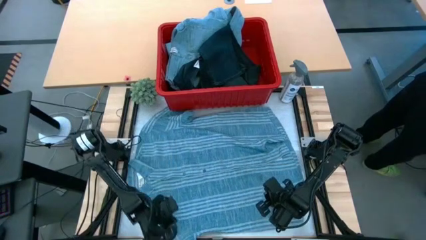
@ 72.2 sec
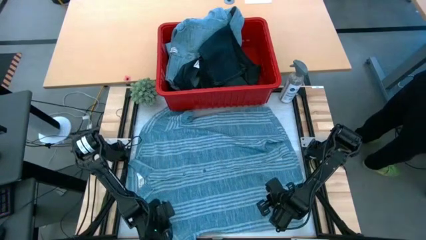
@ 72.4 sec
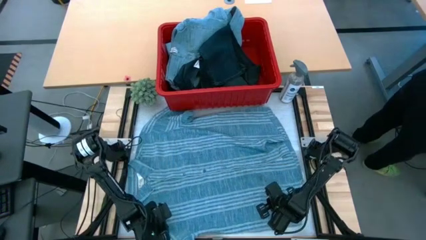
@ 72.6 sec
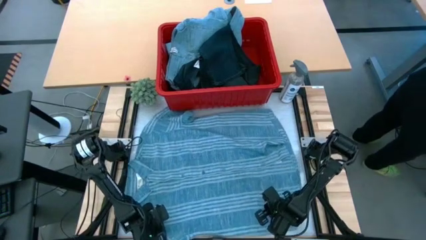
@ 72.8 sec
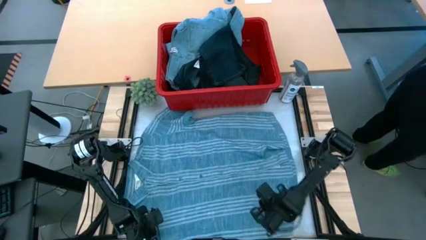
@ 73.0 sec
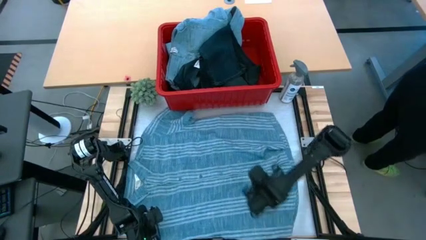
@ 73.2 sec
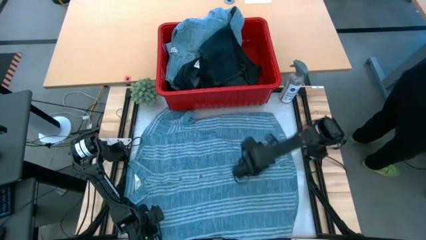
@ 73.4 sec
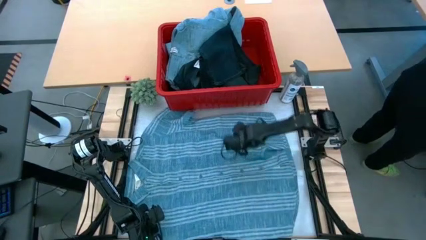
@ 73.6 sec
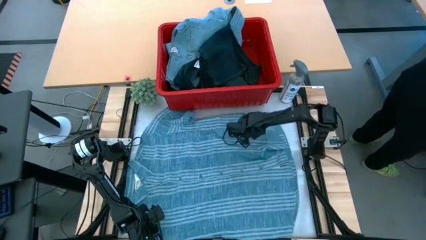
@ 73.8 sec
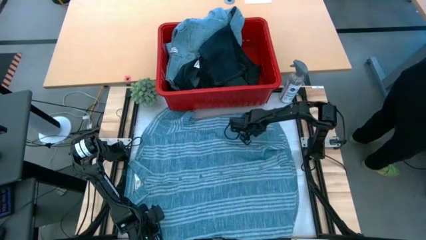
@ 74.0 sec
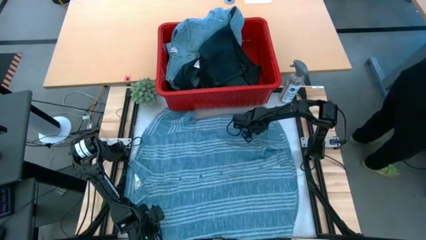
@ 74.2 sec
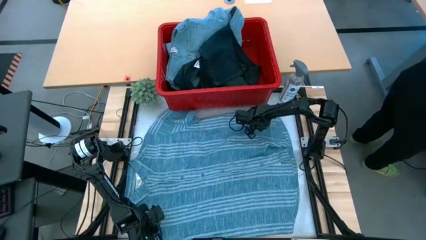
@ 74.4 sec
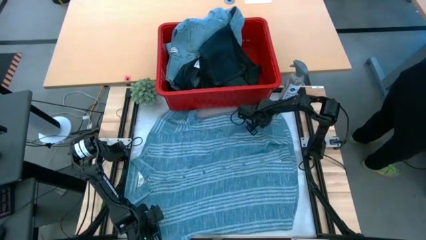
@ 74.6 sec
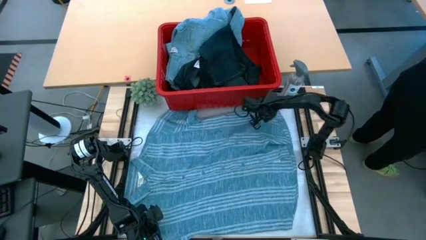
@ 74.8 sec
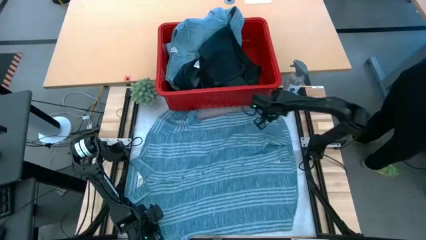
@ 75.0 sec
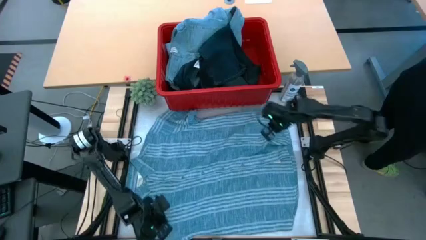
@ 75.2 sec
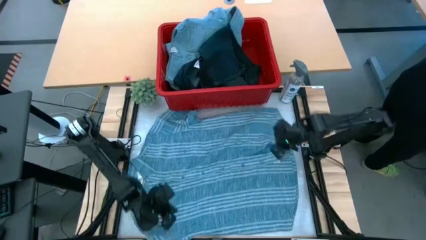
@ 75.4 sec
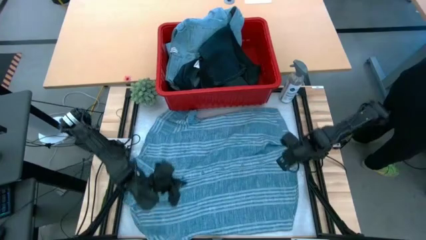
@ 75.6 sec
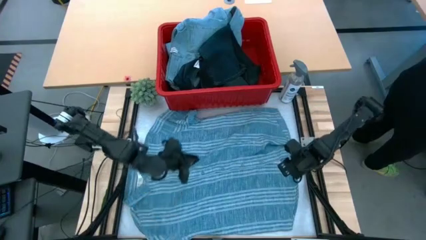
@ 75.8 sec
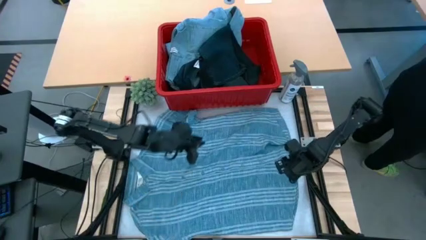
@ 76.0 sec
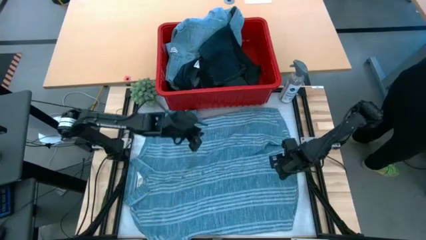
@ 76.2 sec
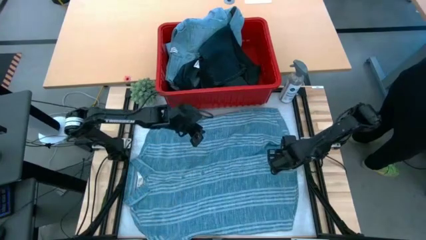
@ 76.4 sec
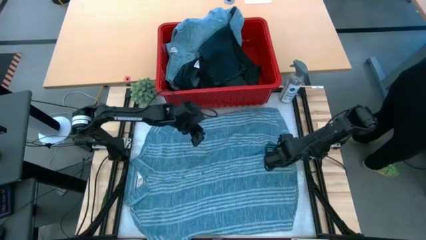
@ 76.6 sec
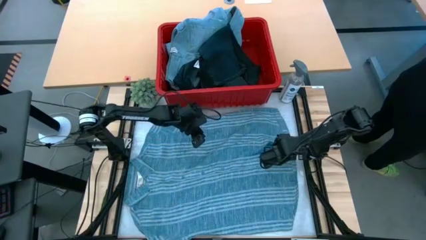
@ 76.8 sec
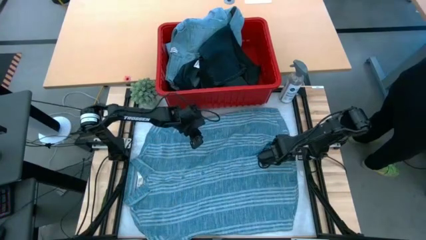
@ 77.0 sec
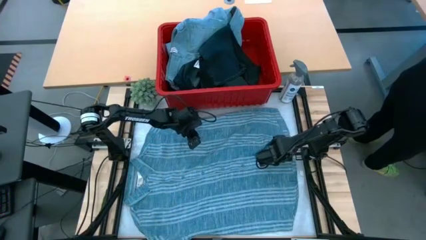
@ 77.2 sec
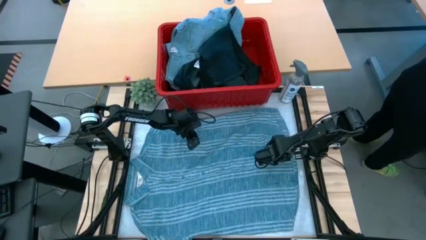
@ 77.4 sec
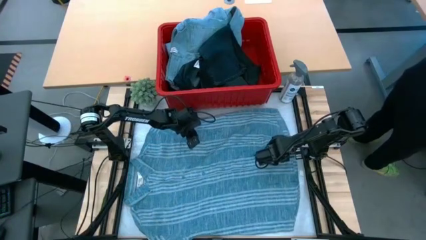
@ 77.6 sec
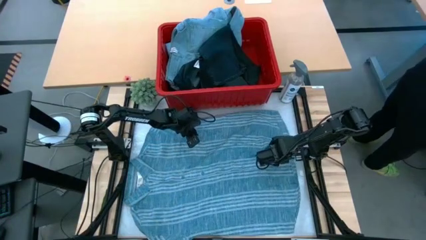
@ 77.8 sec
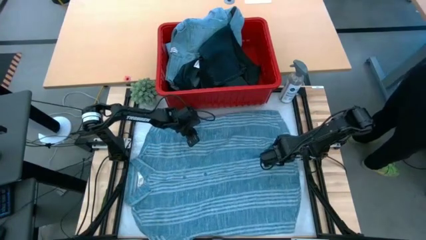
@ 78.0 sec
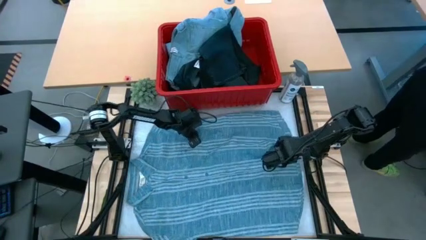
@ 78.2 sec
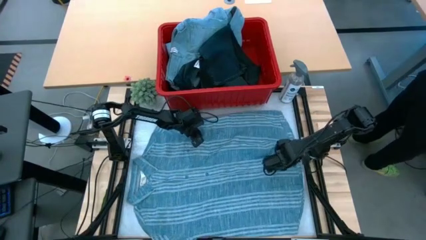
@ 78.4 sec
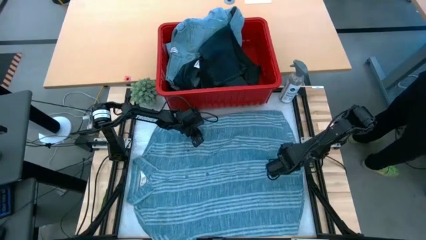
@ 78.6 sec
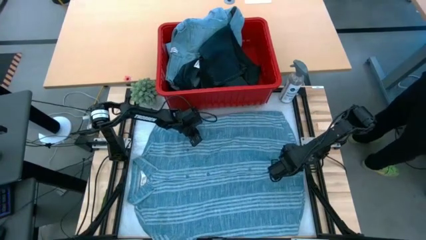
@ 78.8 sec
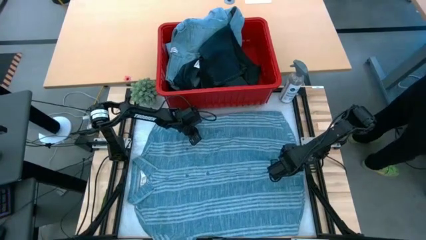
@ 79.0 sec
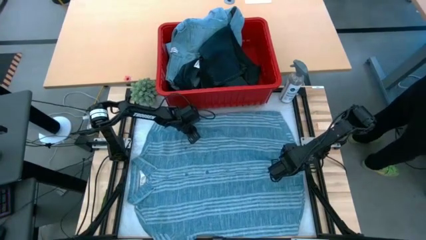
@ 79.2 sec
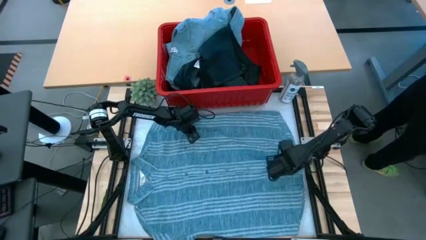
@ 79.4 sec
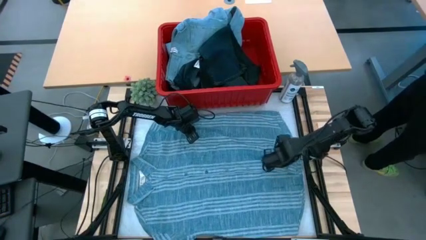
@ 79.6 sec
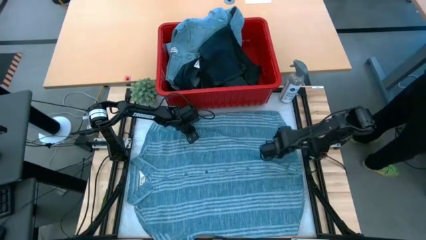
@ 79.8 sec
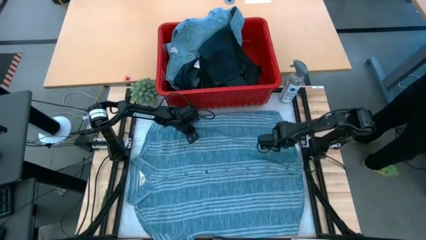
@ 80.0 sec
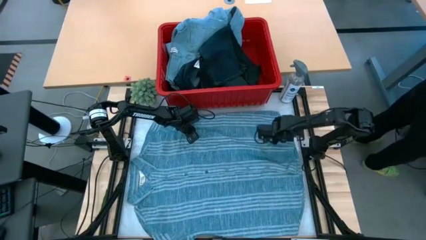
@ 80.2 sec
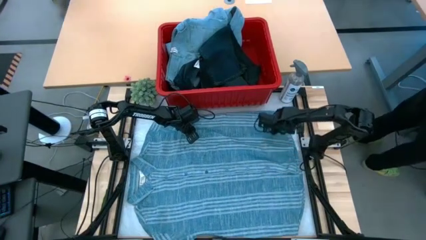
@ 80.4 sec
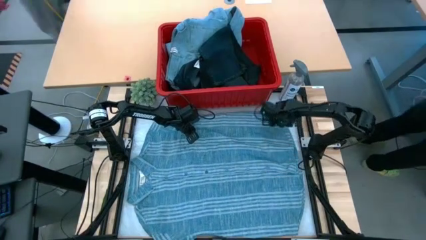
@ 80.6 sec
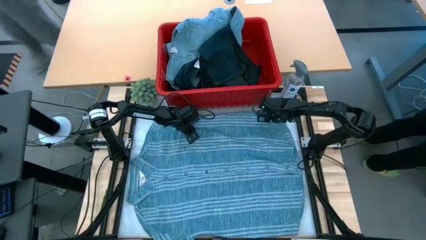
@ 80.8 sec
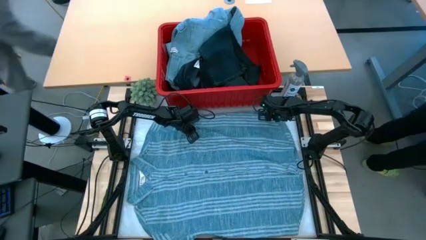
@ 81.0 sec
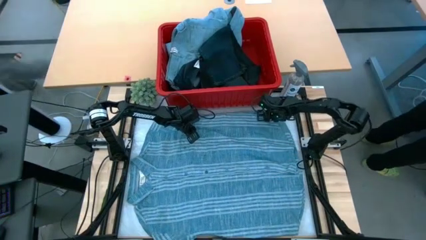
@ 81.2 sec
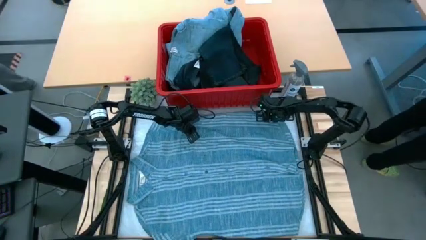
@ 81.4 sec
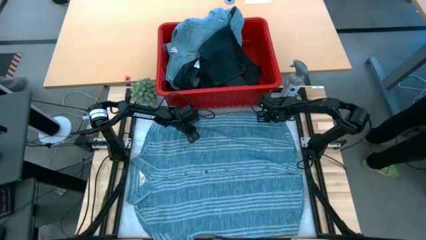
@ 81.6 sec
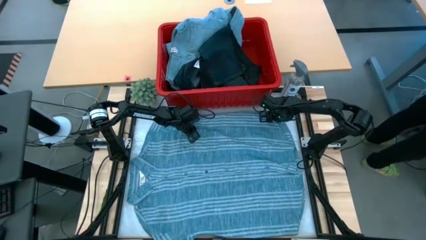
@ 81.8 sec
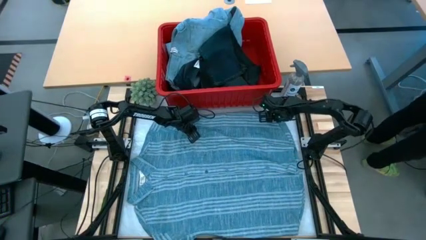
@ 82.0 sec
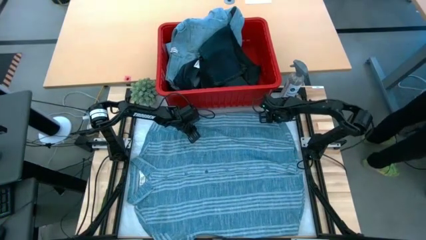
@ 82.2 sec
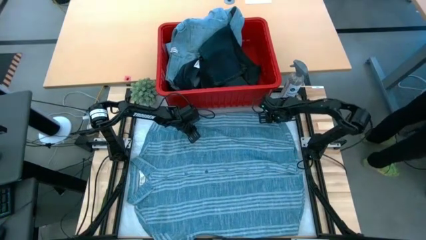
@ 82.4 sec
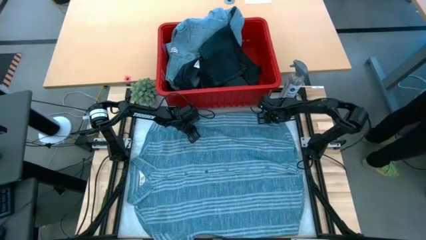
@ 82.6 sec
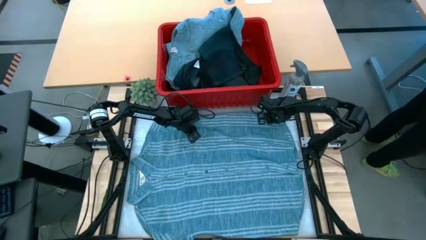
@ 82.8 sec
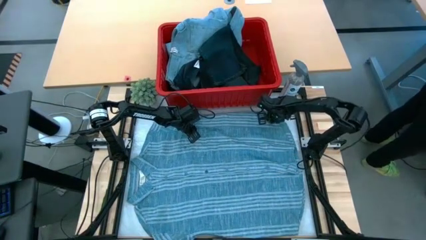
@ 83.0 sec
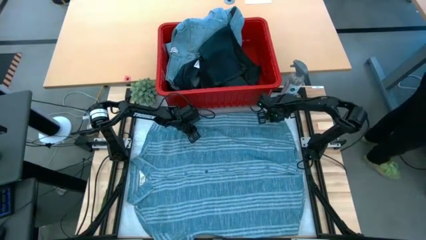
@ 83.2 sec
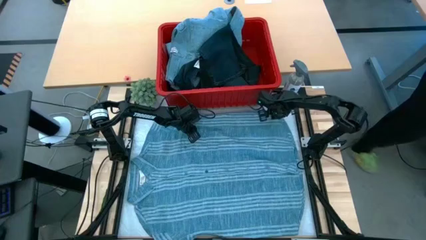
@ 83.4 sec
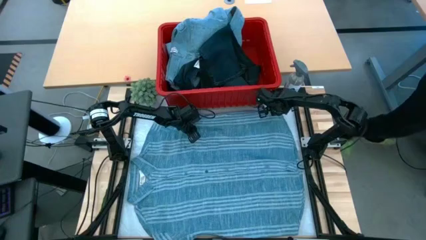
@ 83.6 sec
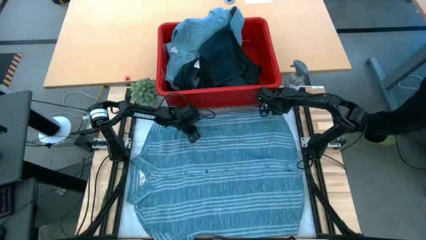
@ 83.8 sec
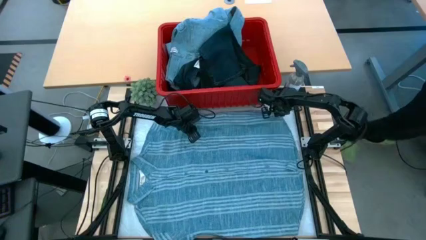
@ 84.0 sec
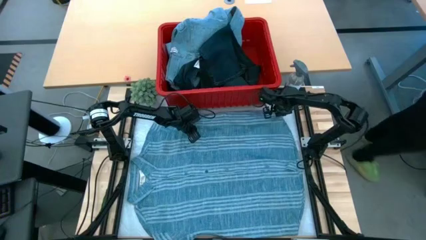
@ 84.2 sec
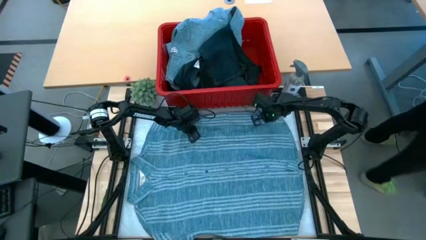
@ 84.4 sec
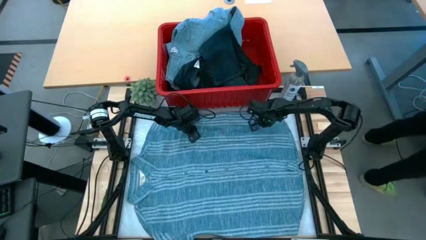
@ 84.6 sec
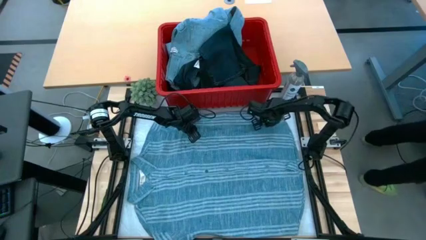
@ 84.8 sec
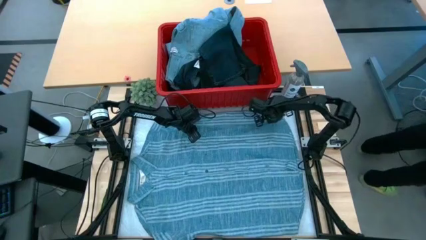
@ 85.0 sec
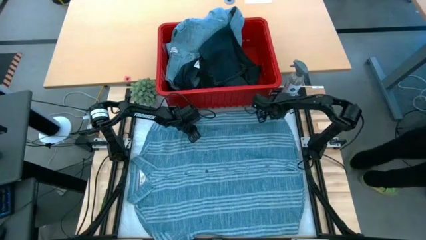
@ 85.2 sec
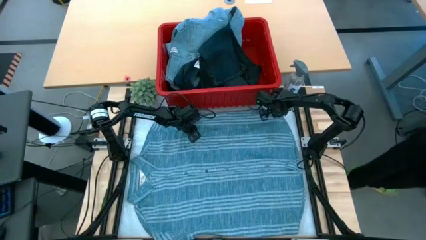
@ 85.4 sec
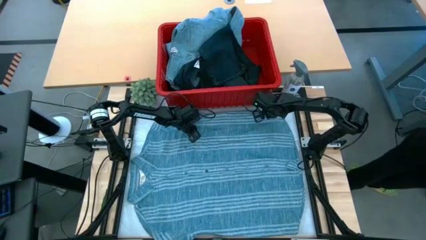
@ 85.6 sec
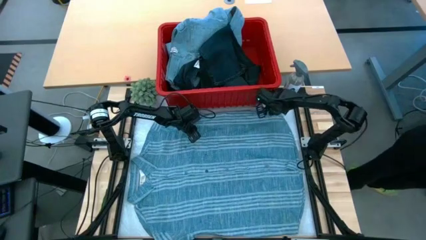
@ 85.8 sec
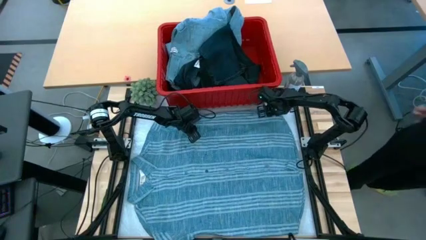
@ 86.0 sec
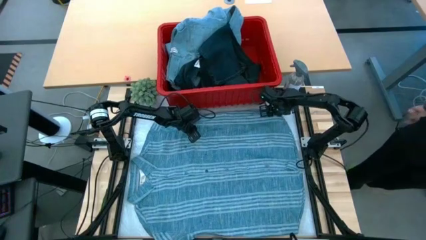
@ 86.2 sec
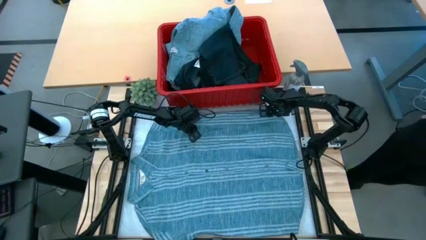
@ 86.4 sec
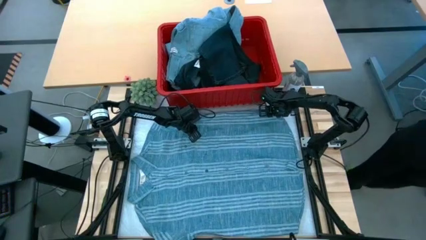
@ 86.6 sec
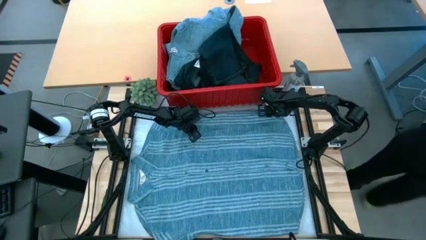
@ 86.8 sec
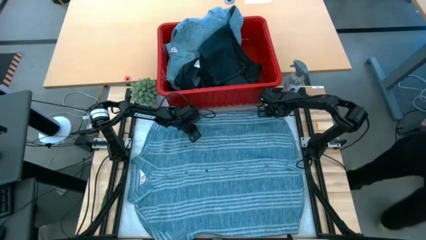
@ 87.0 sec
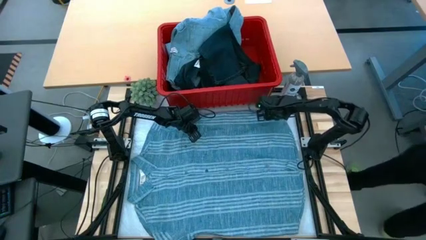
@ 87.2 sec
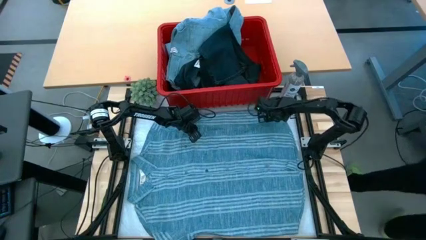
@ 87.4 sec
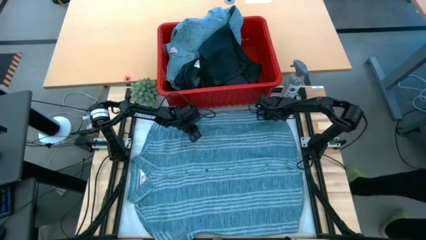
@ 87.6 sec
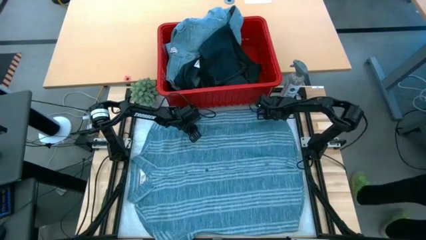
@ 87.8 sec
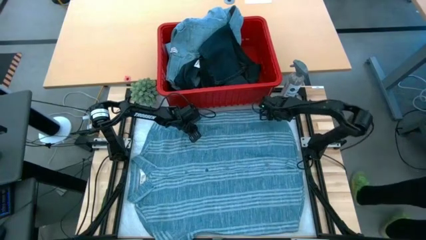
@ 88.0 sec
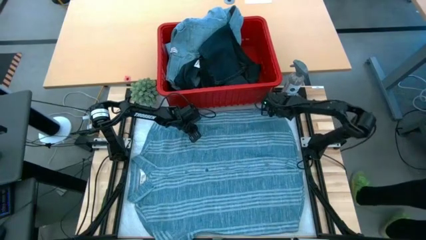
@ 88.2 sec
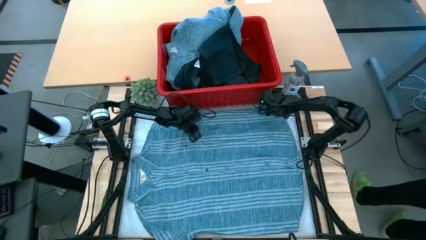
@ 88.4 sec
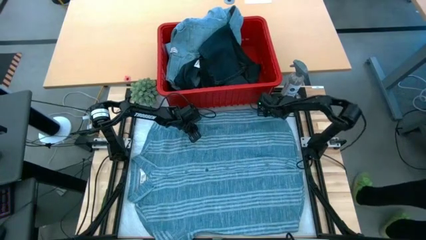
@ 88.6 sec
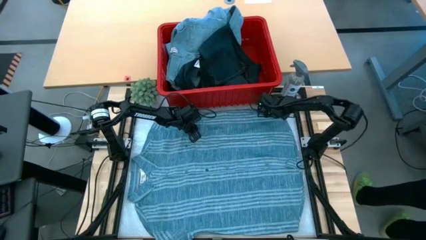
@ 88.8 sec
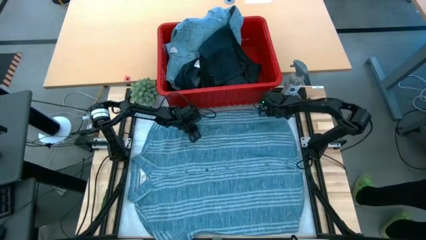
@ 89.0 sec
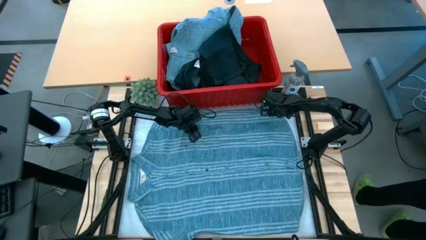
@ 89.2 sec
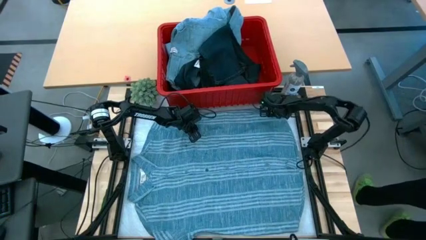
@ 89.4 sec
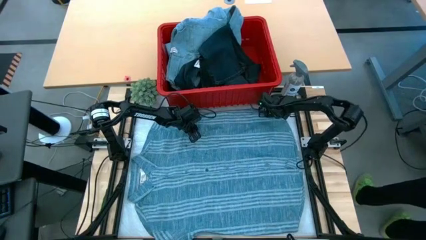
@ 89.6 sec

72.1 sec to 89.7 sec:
Task: Fold Laundry from Bin
Fold the blue polo shirt
